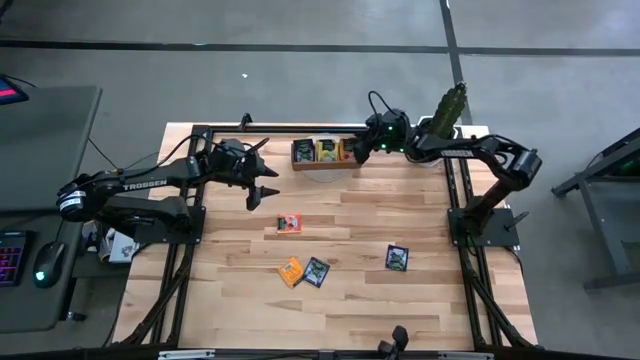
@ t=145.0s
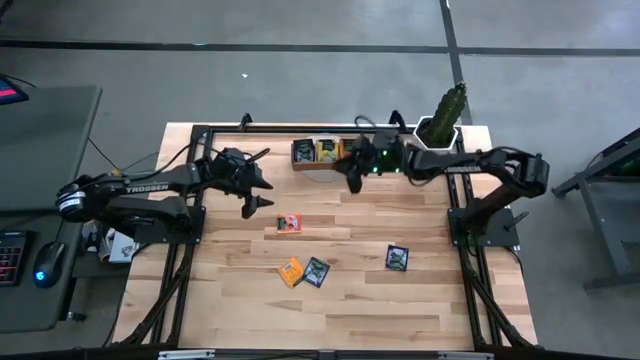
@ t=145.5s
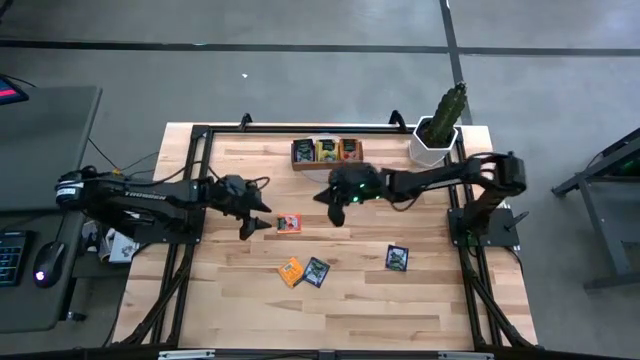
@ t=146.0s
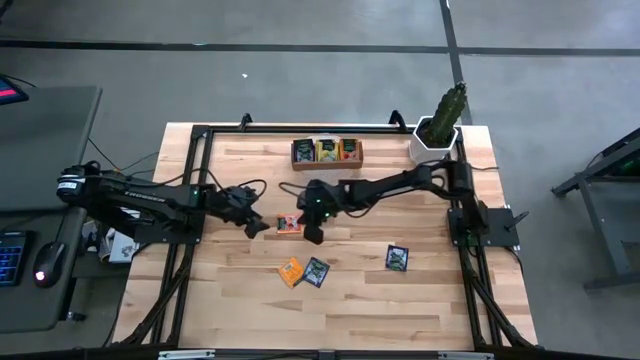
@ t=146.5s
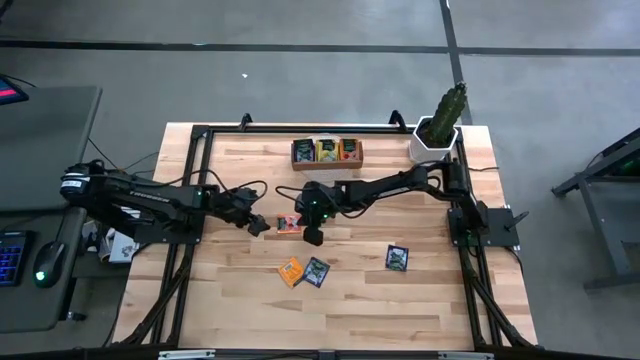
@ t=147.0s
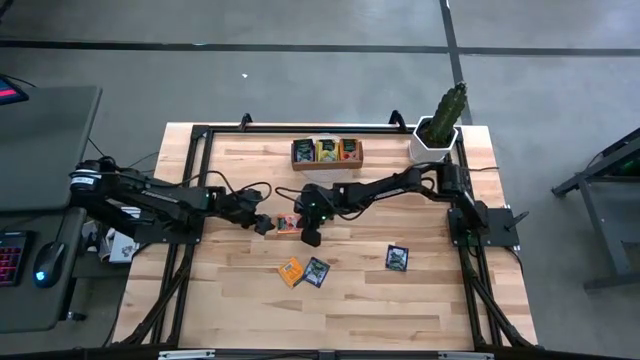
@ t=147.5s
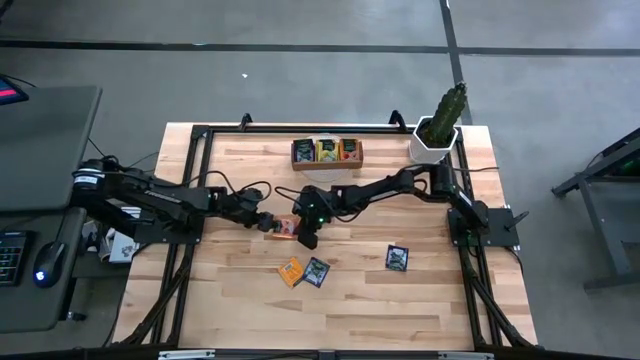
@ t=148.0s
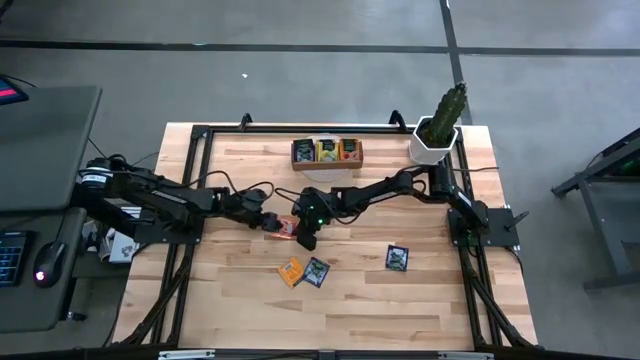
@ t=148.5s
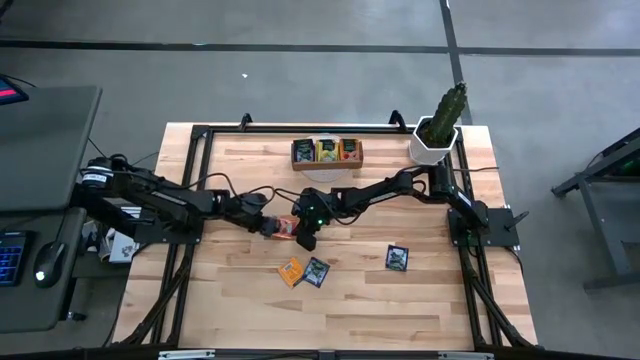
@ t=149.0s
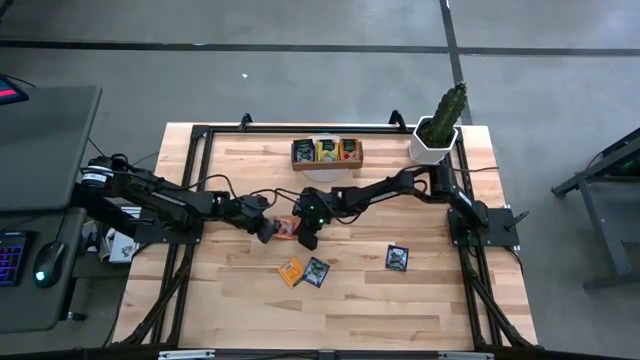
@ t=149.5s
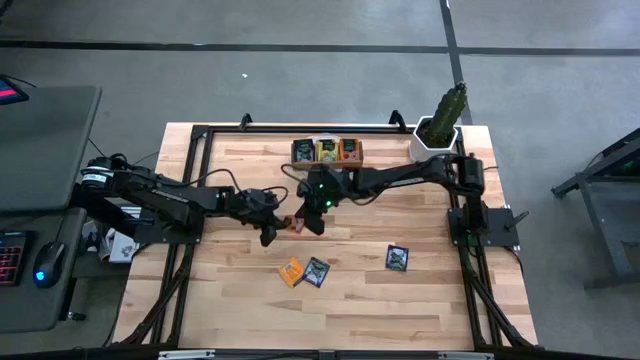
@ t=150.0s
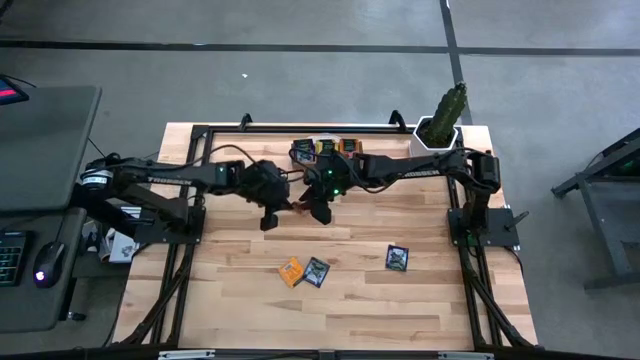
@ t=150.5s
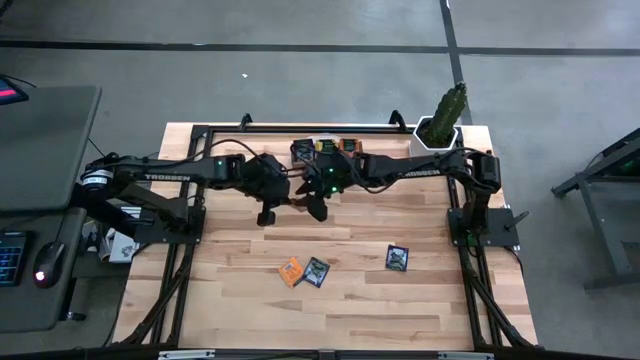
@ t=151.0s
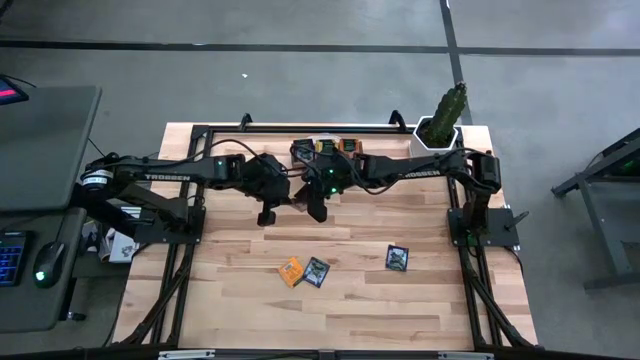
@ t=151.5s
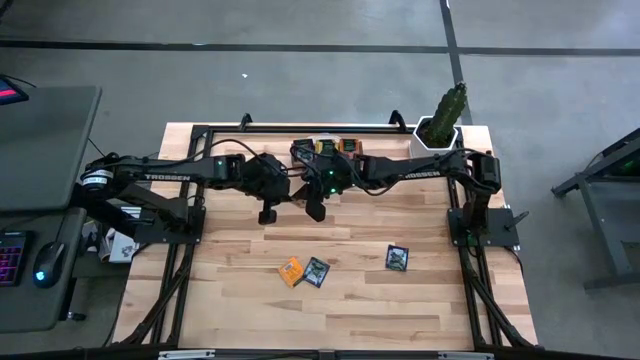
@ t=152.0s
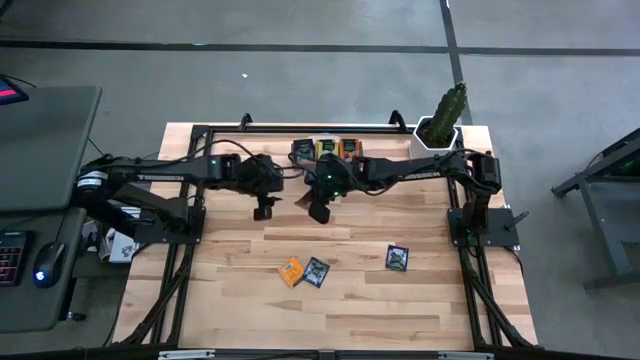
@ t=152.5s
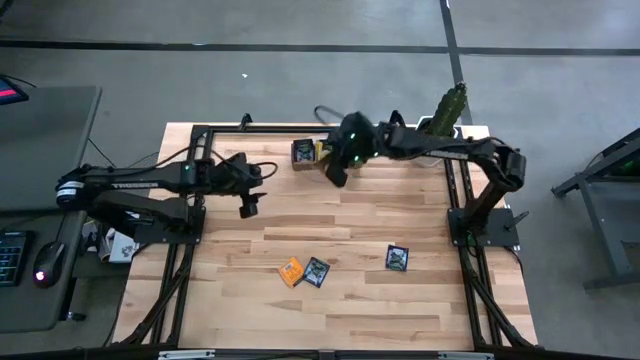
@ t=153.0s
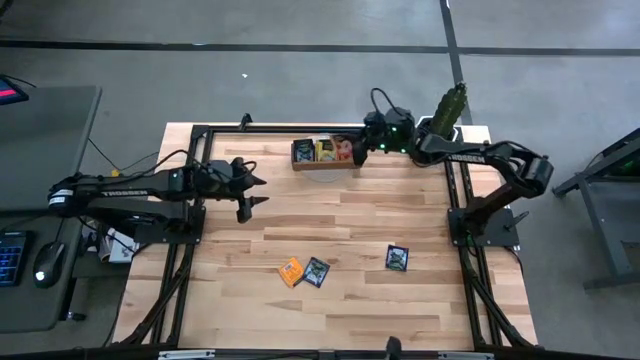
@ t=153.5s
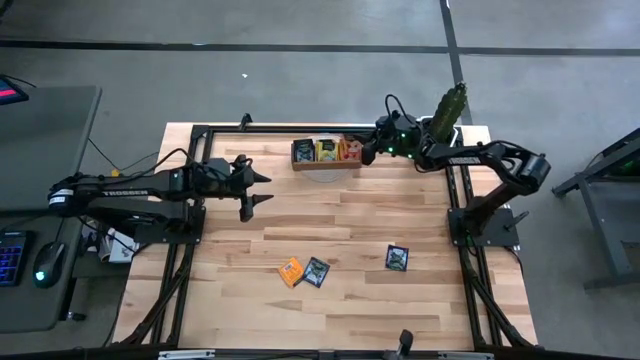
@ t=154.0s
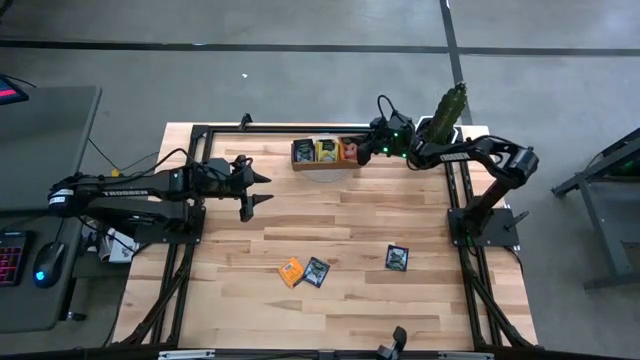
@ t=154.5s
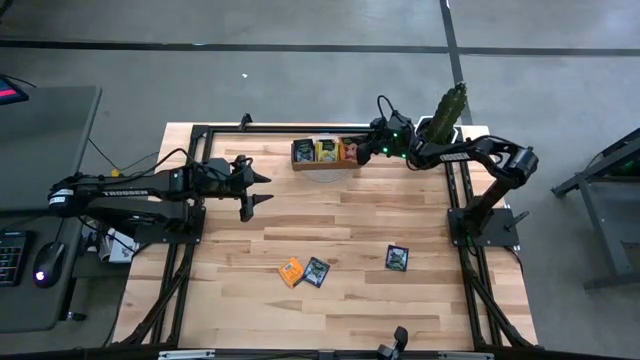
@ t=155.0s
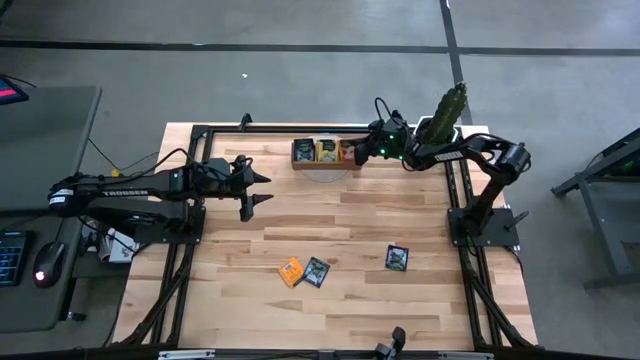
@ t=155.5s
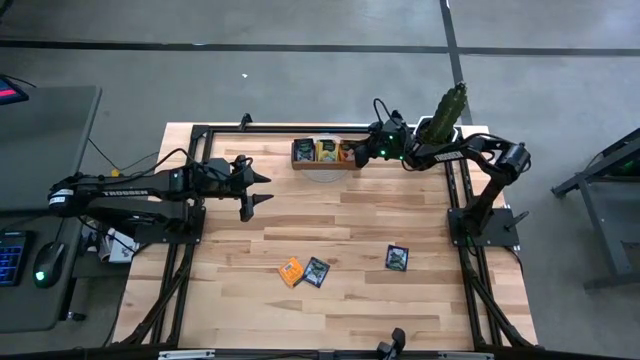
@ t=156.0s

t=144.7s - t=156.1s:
Task: Pick & Place Tea
Put the top orange tea bag in the right compartment of the organizer
